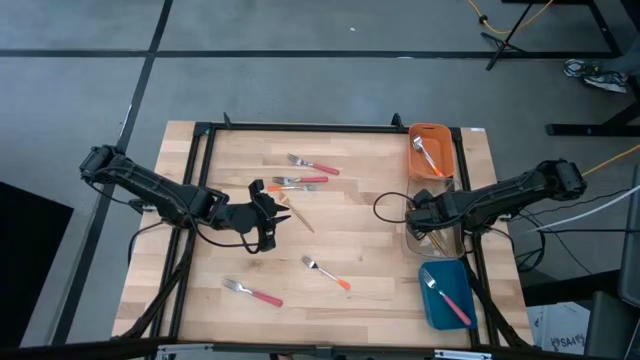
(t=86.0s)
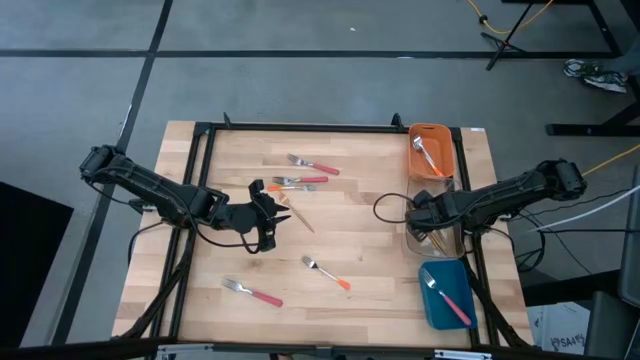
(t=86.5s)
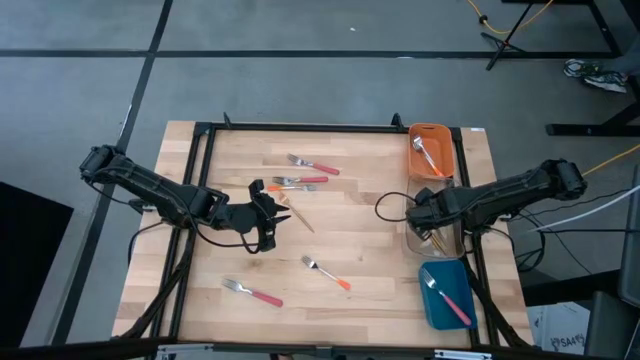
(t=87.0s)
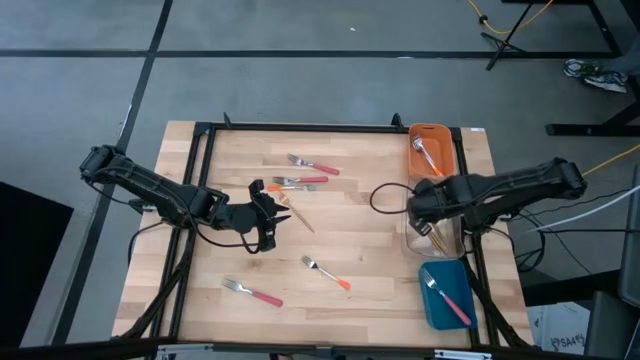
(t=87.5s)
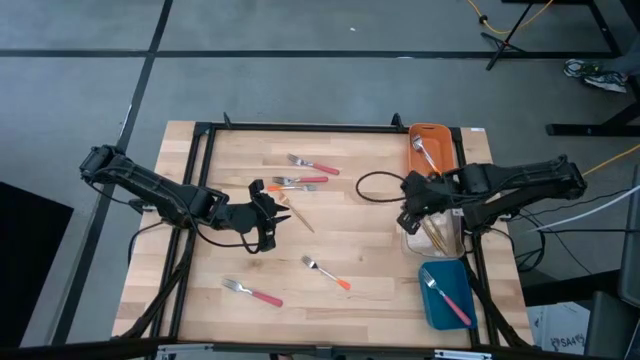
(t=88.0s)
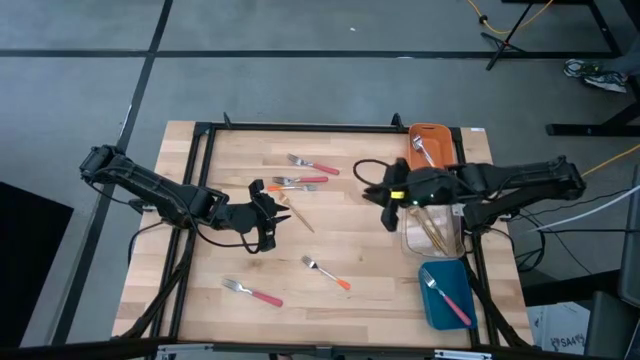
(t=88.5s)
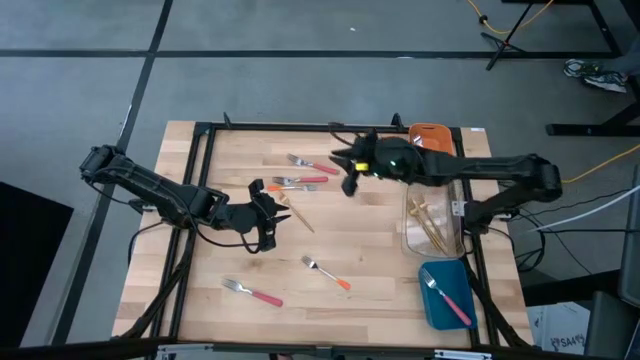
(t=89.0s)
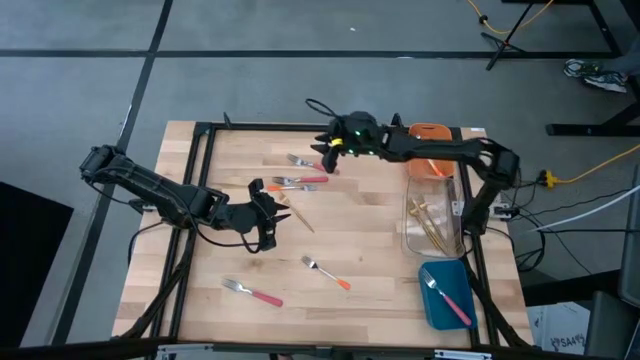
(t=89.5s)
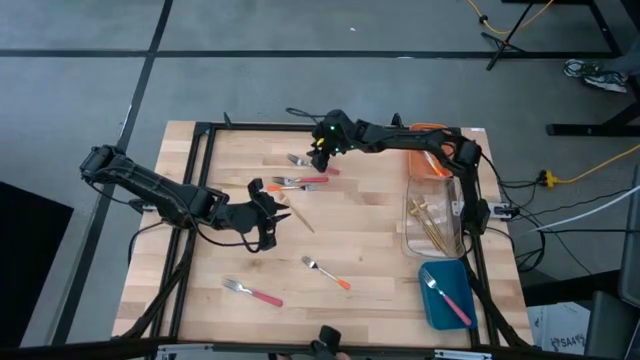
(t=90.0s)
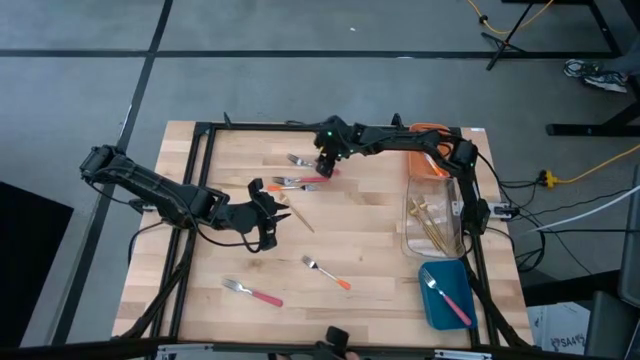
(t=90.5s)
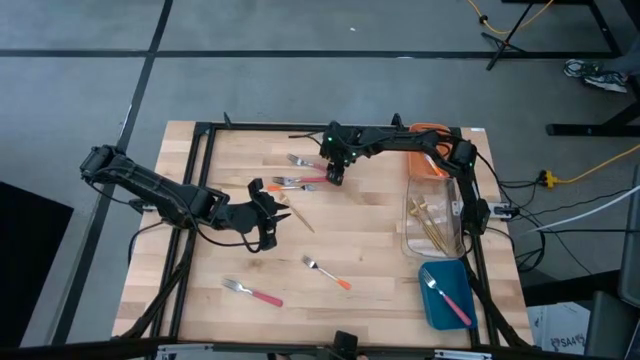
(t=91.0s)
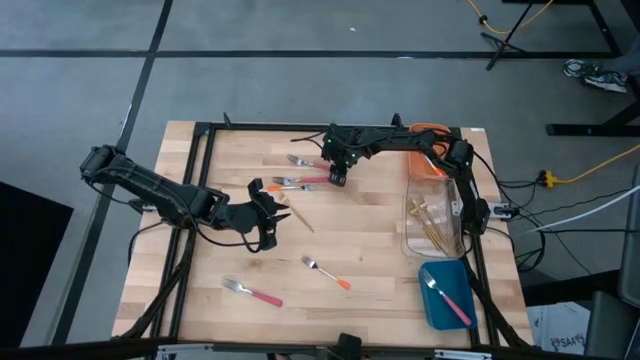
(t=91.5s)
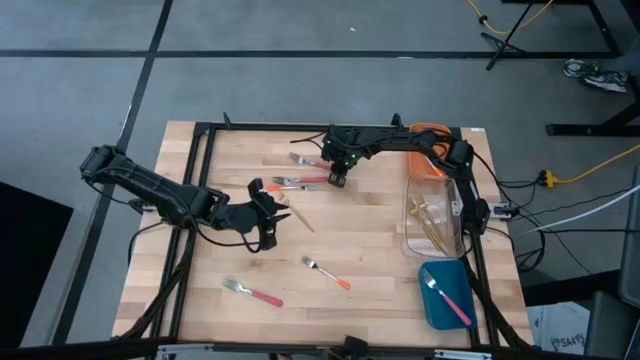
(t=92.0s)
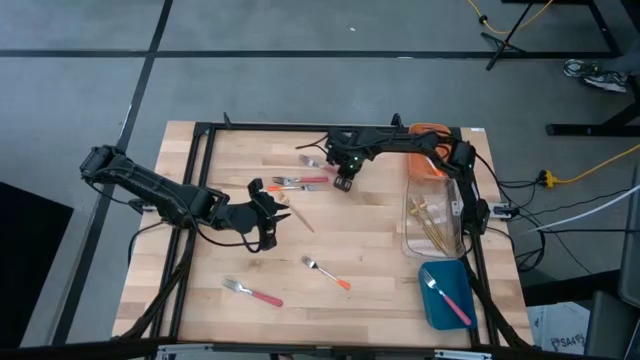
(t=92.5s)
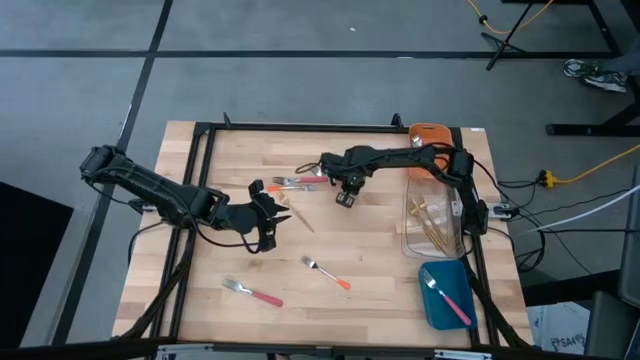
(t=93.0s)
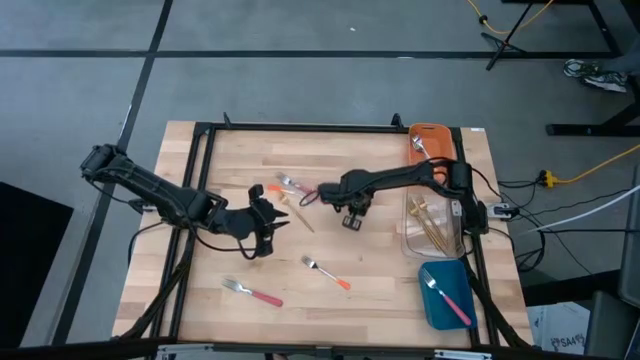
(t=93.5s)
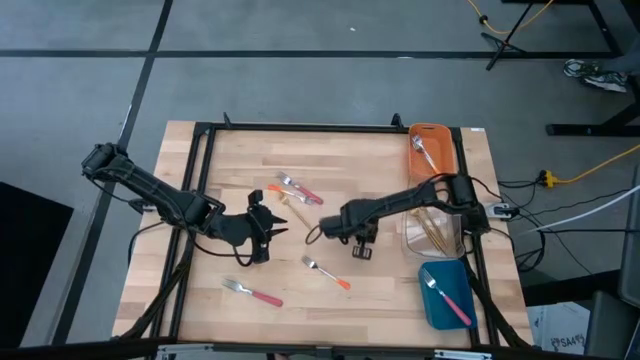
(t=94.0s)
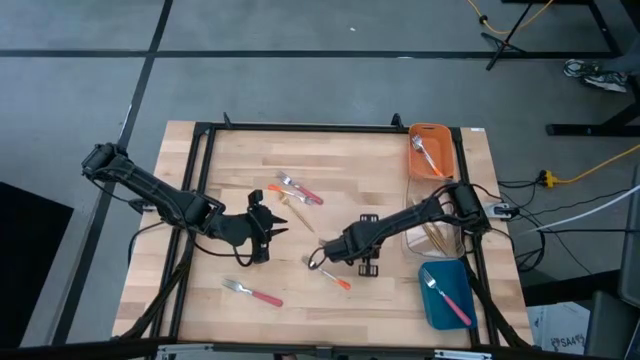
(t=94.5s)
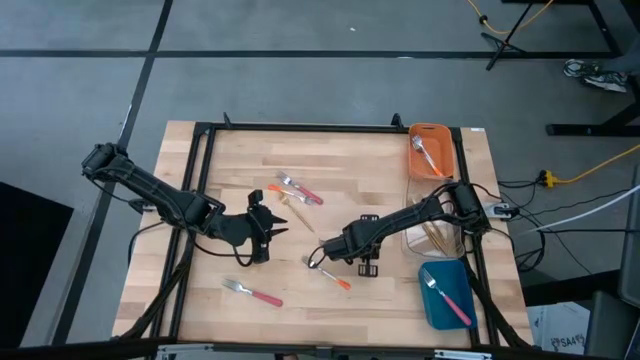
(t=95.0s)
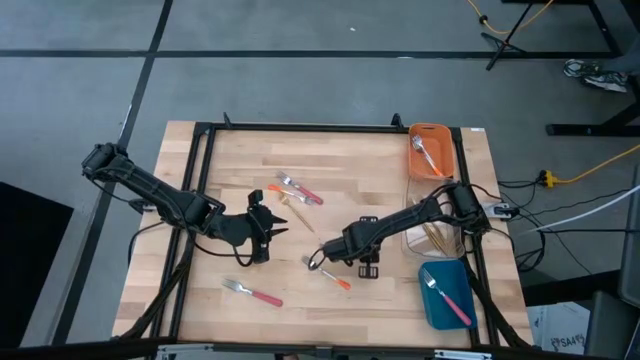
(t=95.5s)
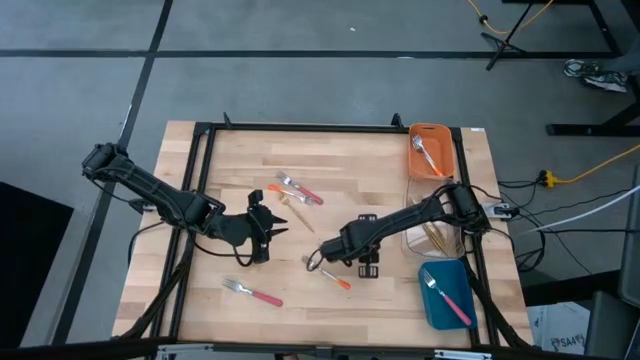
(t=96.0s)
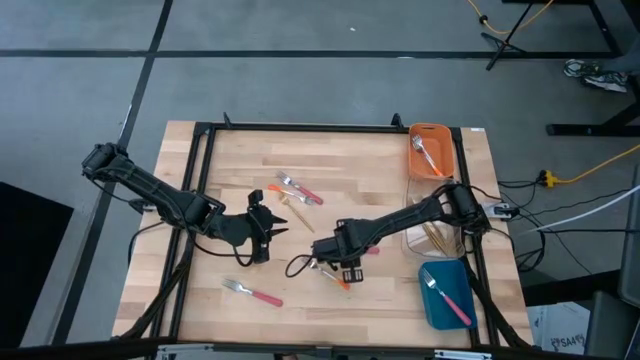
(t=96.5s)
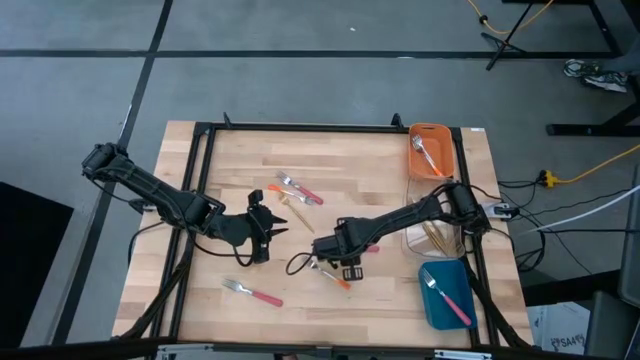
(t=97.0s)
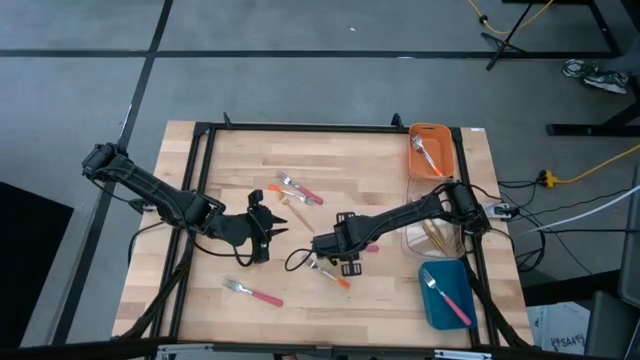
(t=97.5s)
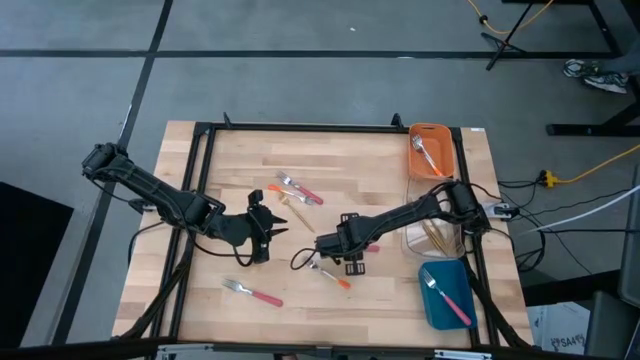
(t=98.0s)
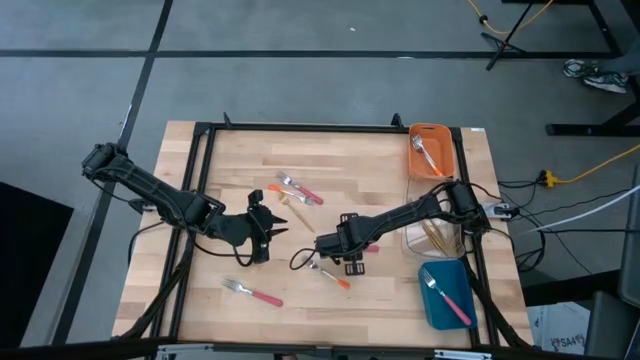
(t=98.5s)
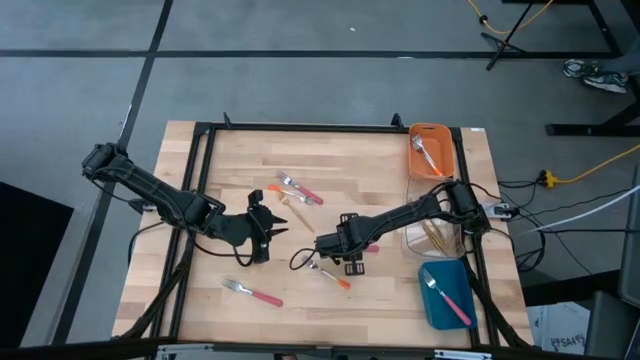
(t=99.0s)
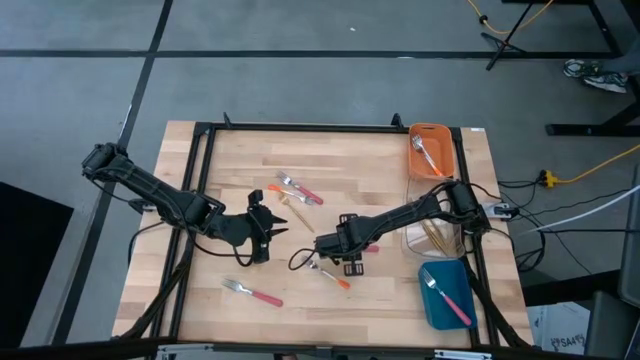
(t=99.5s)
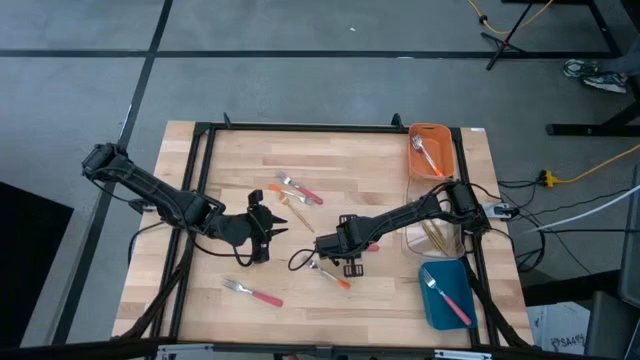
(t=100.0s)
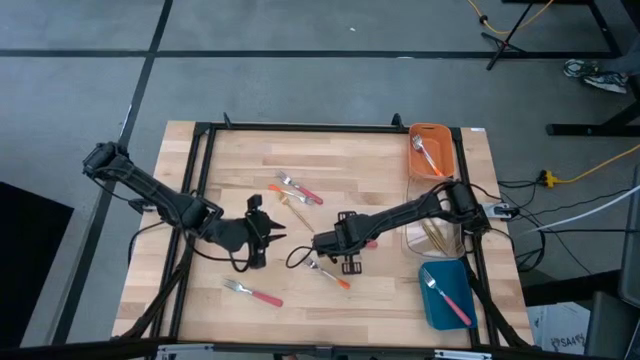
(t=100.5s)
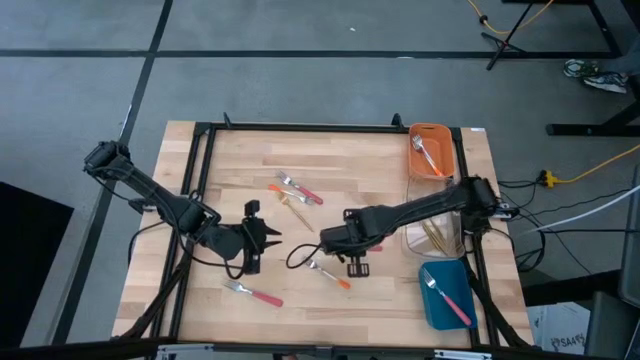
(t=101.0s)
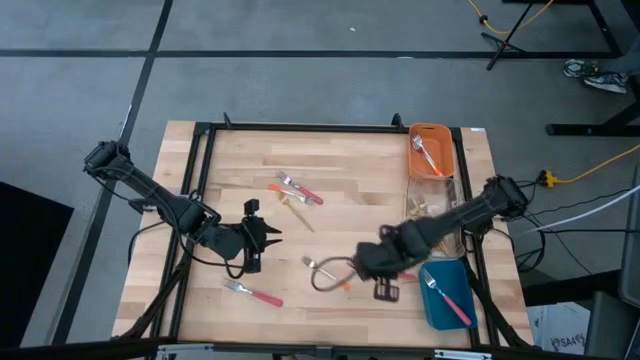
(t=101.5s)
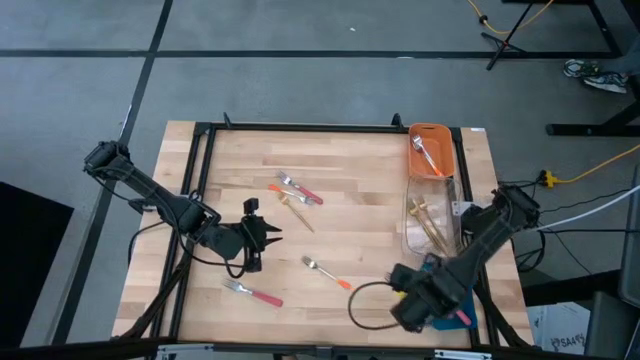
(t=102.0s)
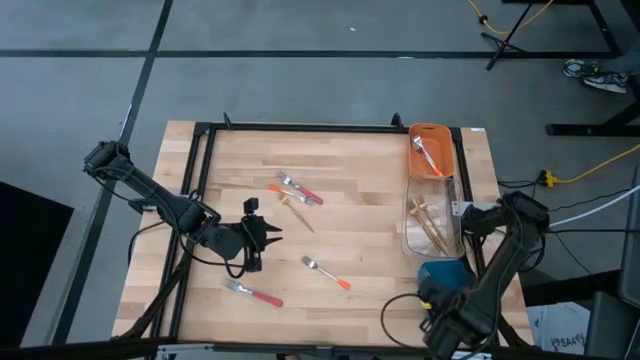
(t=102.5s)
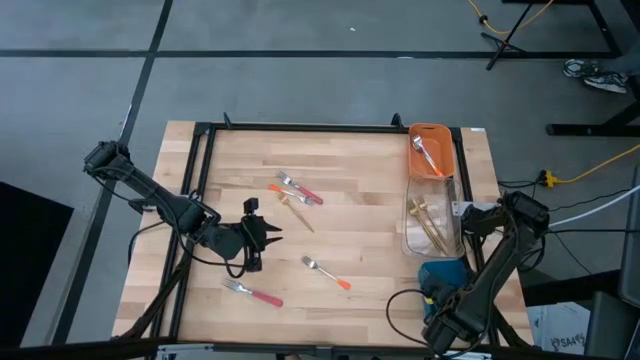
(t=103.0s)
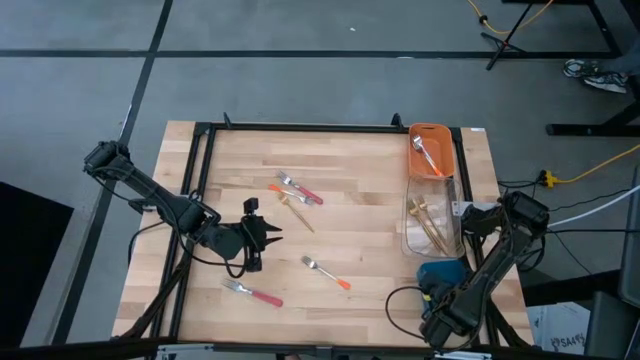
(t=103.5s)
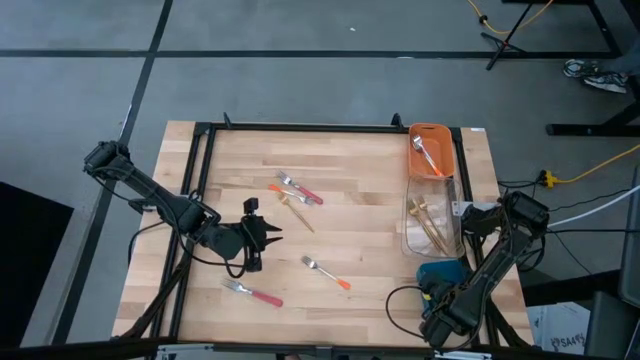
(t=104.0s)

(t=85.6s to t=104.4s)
Task: Sort silverware by color (type)
Put the pink fork into the blue bin
